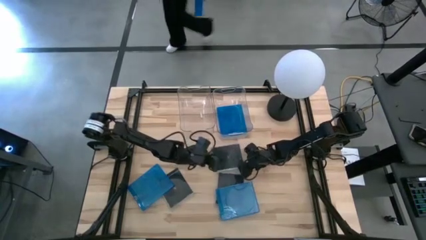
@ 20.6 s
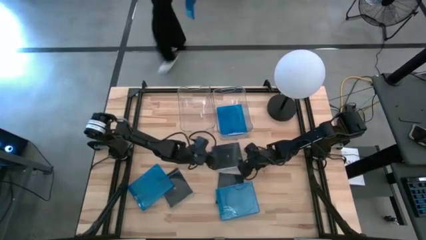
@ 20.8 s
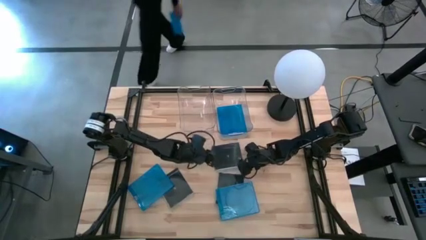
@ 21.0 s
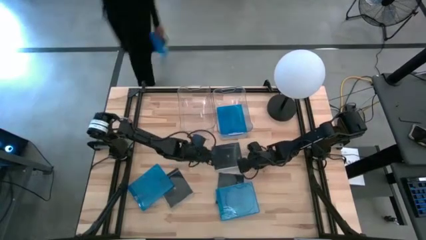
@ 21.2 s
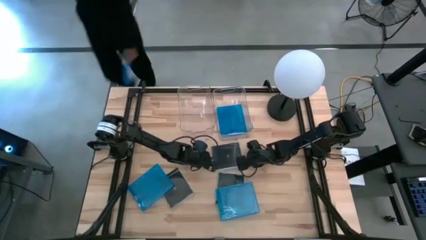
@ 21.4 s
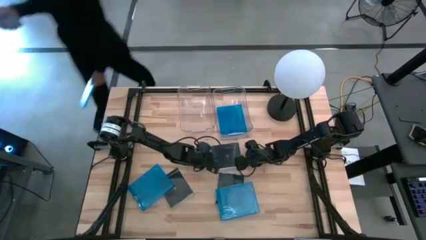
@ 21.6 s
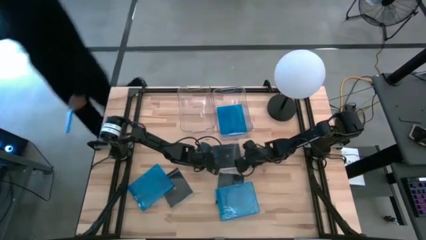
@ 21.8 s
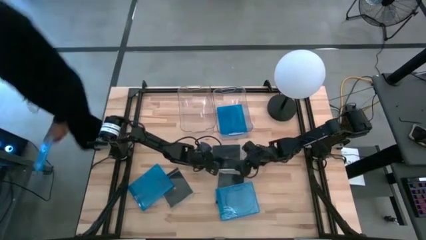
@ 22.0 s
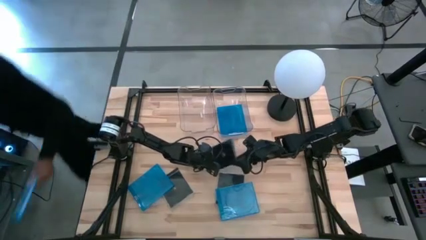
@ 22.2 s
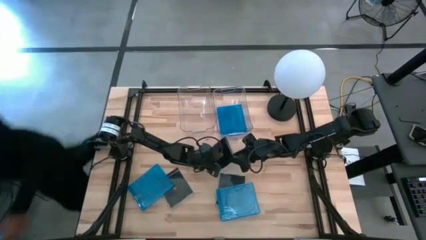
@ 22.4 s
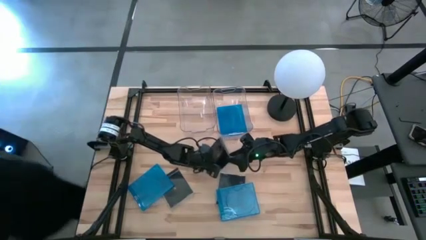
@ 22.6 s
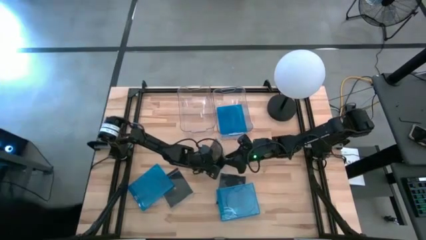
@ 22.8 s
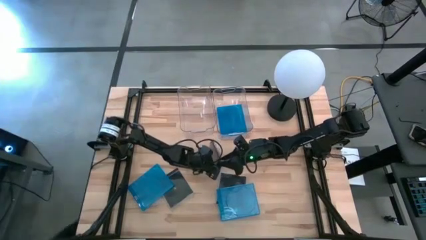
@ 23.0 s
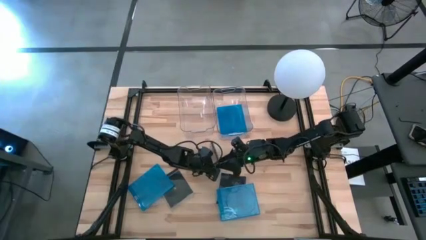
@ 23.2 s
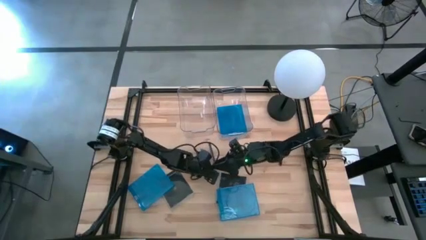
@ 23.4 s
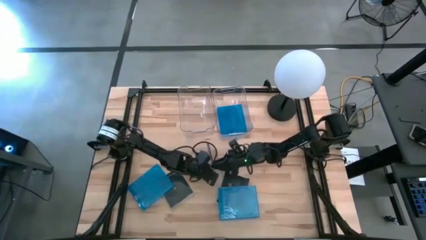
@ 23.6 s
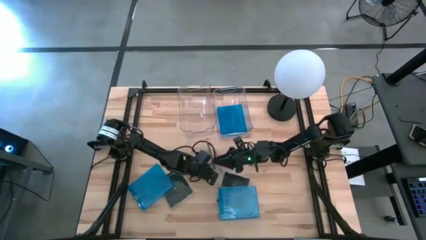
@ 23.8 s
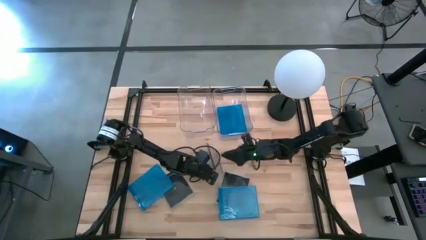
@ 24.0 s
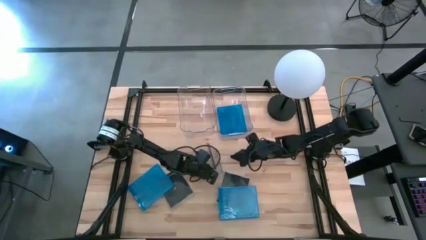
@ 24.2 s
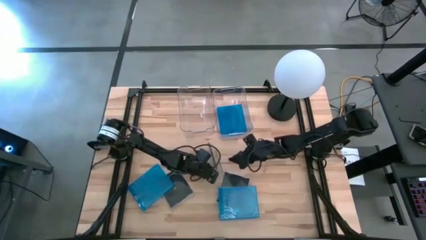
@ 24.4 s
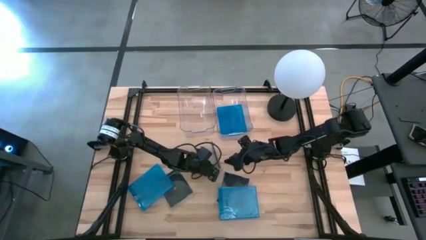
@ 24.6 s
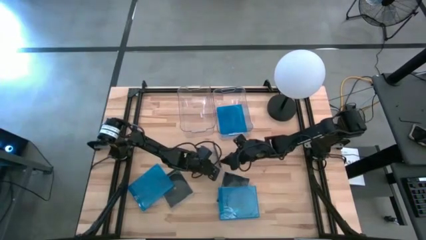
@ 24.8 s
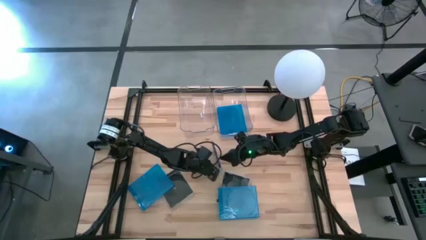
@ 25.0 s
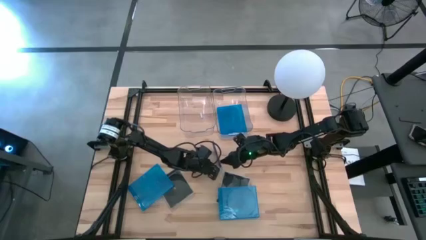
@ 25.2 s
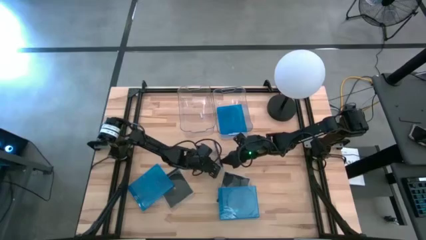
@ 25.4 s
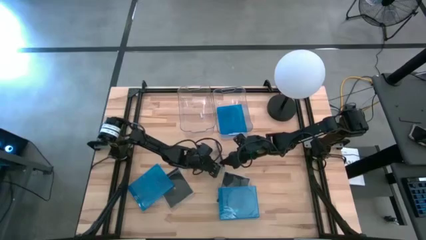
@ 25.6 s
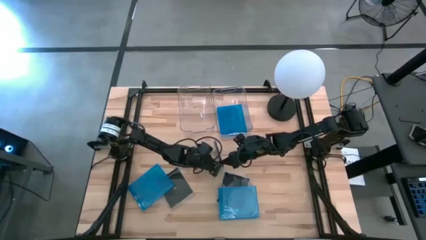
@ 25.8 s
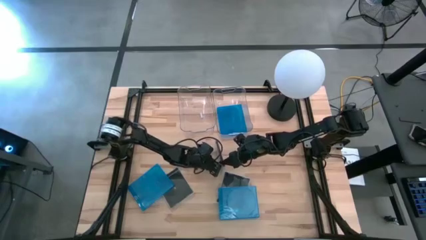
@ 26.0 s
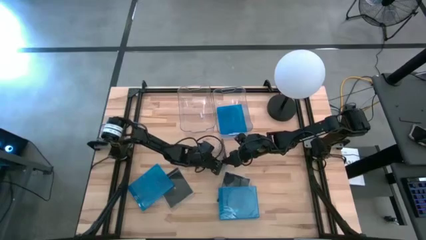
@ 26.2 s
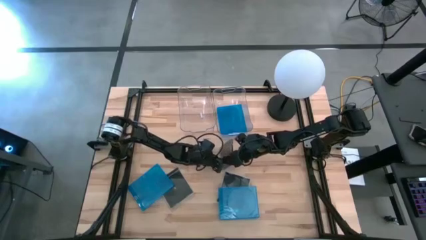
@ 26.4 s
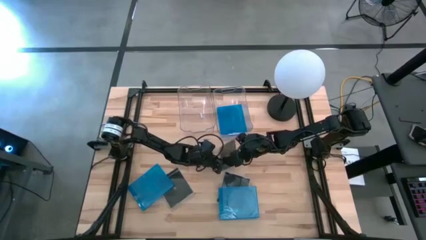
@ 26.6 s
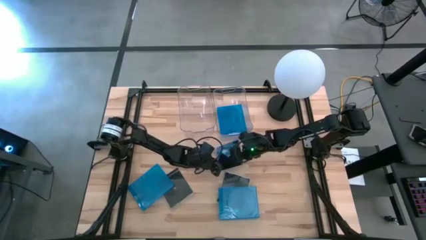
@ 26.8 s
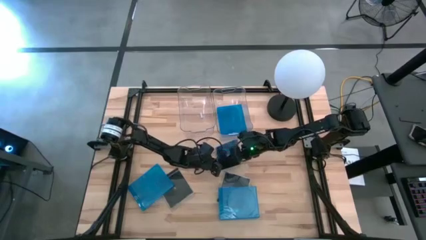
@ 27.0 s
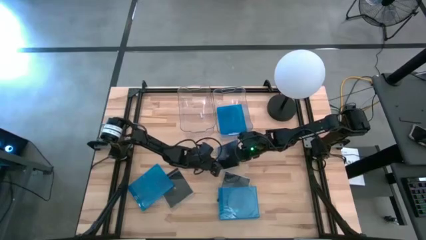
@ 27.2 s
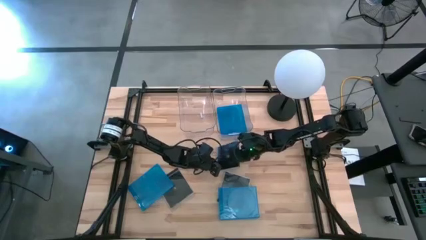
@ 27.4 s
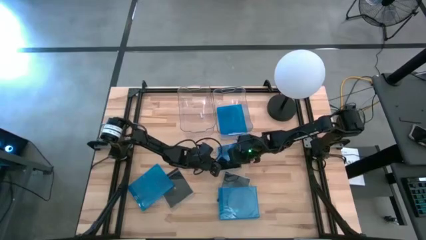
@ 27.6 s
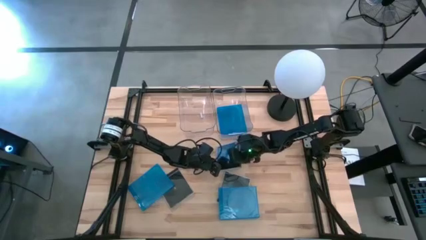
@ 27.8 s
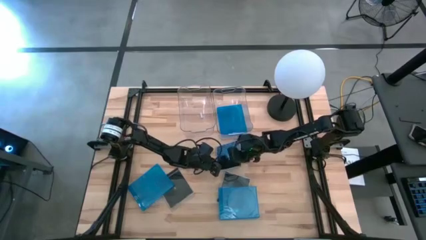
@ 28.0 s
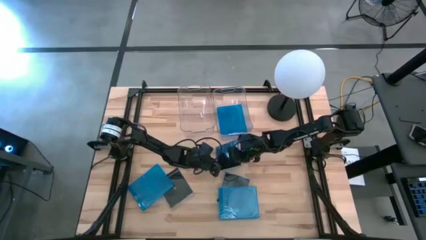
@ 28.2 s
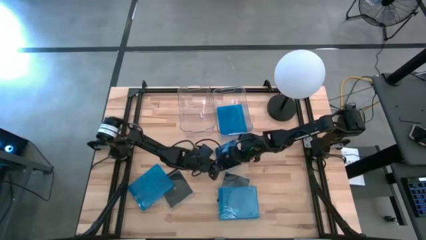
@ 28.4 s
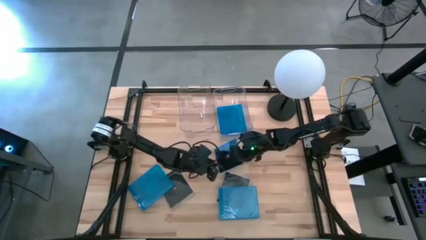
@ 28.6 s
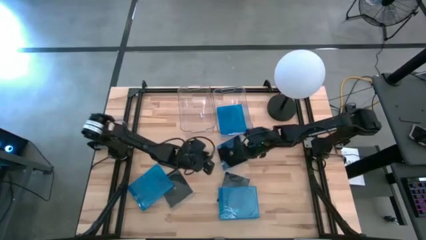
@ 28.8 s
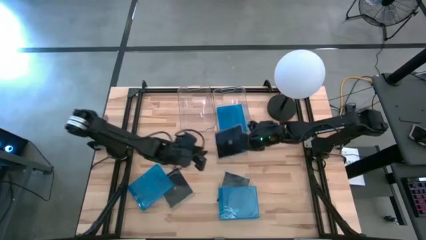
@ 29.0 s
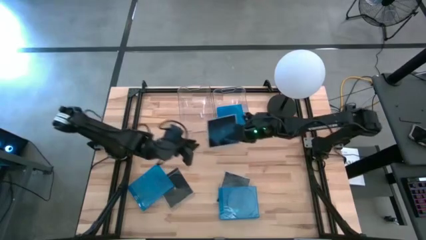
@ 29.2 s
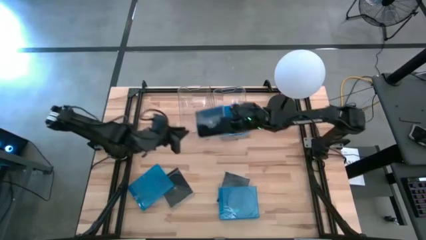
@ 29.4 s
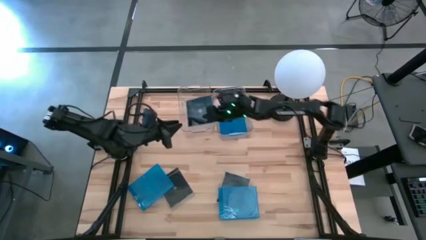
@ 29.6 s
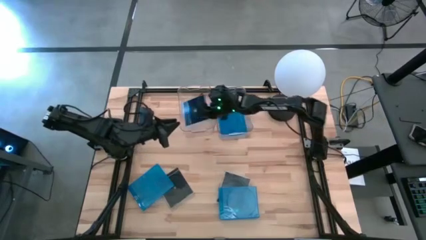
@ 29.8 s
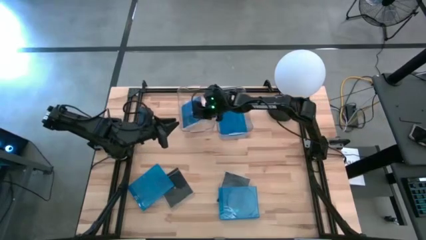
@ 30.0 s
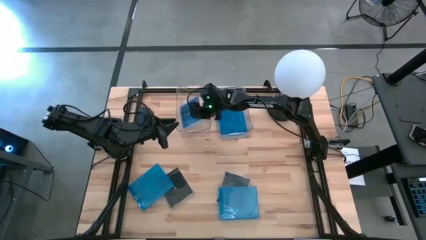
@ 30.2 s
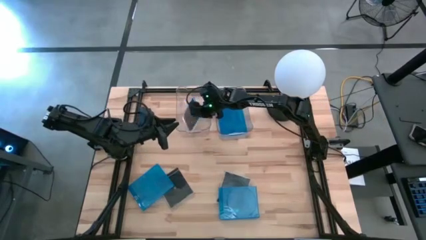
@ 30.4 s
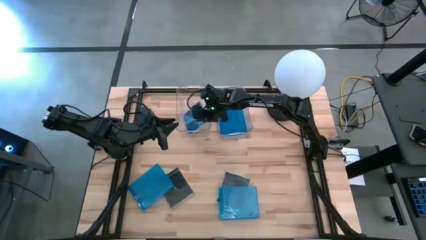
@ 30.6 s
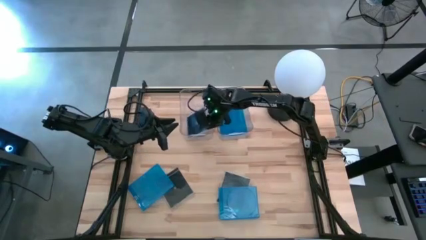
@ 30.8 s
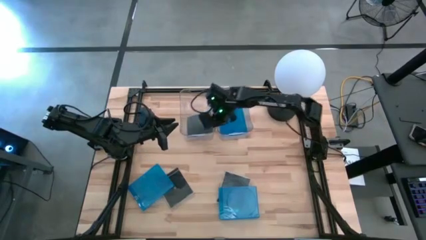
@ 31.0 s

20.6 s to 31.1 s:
Task: Pick & place jewel cases by type
Put the right black CD case into the left transparent bin

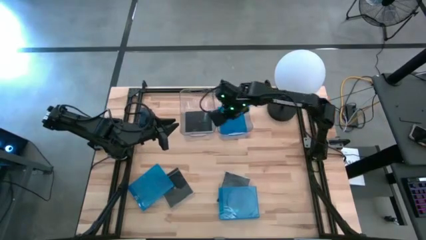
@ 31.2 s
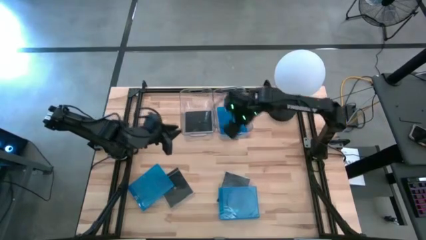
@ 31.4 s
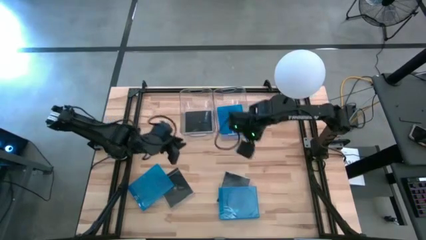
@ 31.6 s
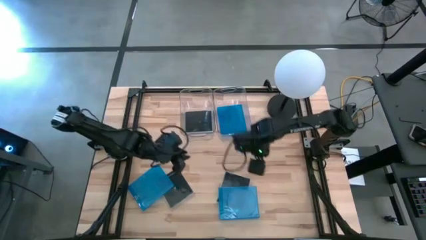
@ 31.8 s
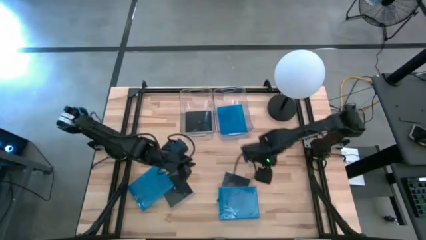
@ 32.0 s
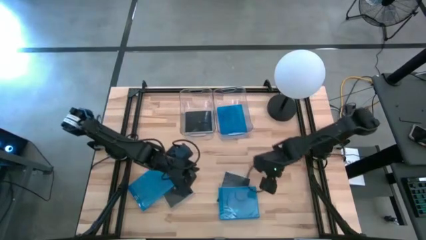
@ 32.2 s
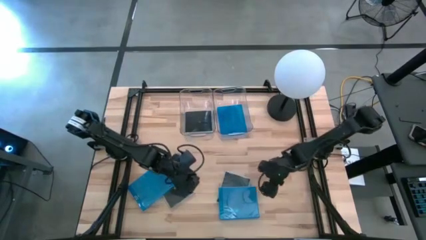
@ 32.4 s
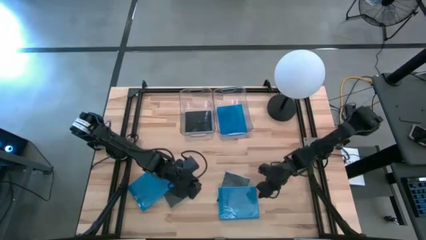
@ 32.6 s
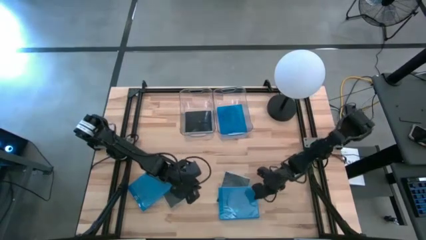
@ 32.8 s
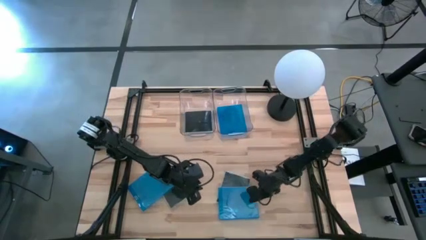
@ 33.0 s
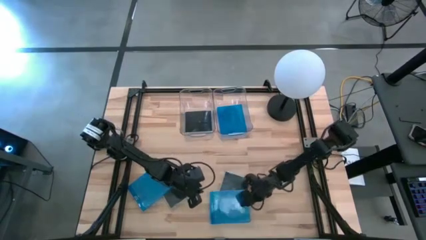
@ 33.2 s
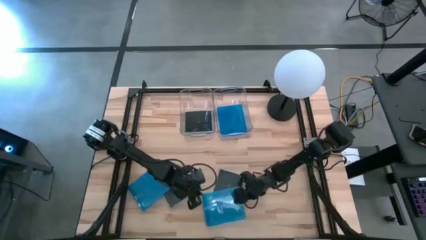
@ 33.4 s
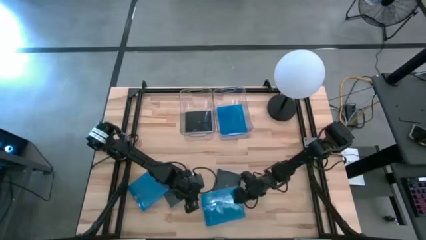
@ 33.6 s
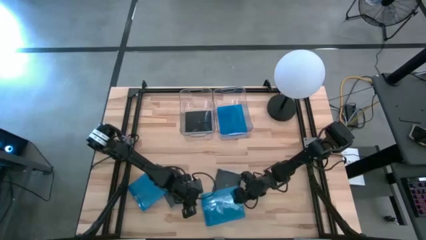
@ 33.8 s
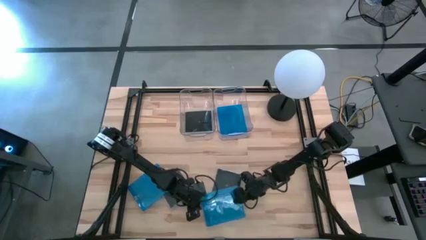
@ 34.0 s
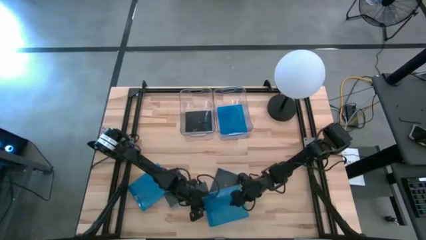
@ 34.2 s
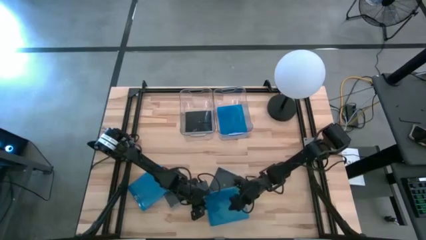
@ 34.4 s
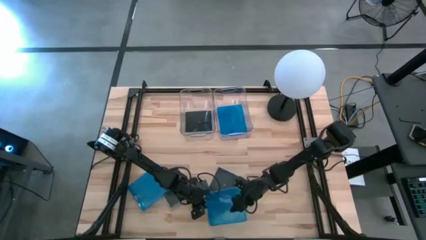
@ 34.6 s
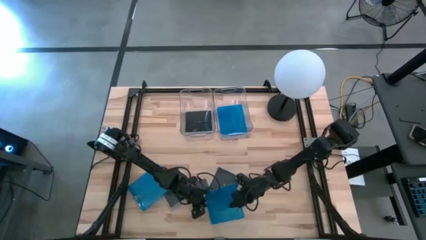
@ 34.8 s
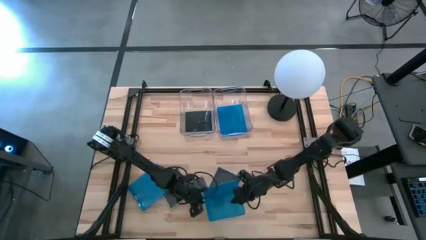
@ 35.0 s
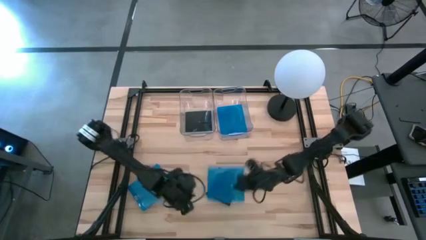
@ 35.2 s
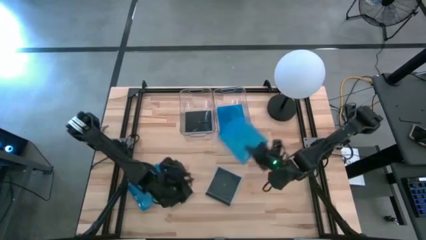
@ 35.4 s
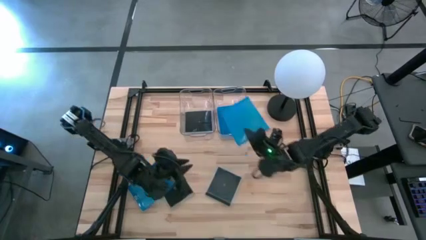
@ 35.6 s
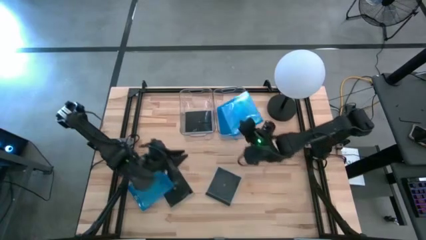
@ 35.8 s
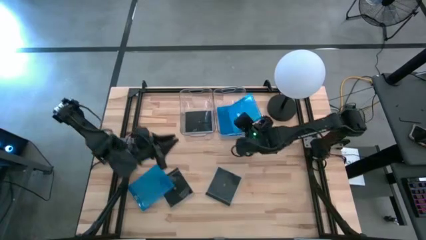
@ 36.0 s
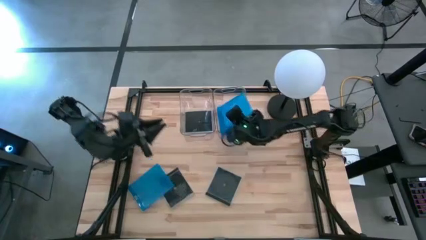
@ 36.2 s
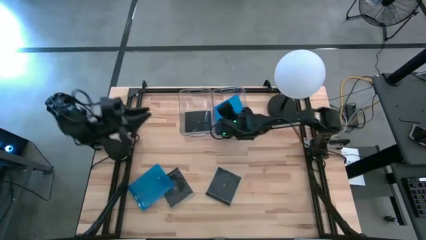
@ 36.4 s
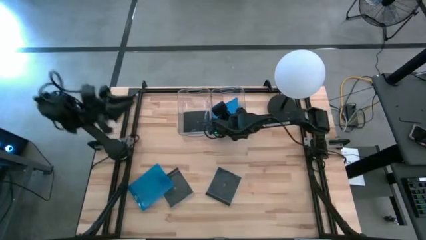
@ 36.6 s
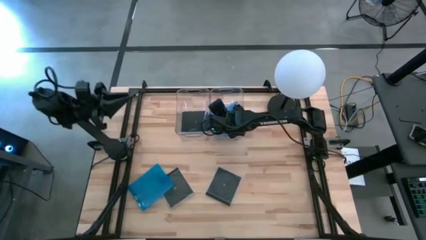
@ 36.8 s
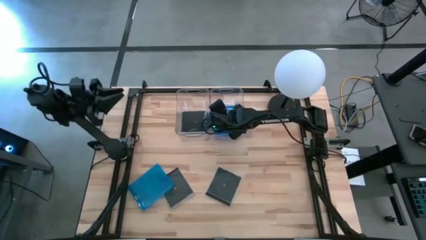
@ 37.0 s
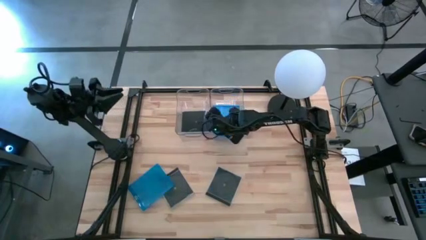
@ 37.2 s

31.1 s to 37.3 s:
Put the right blue CD case into the right transparent bin
